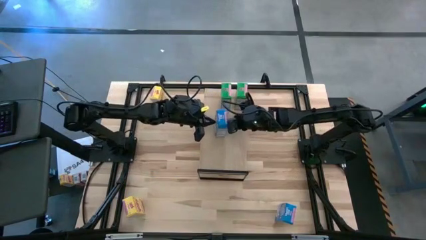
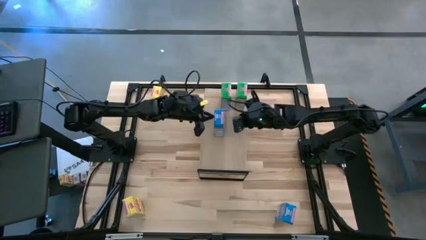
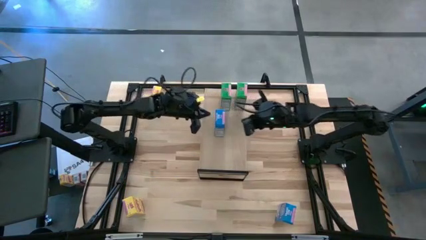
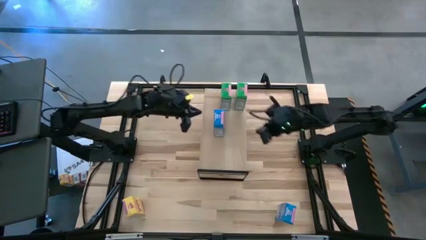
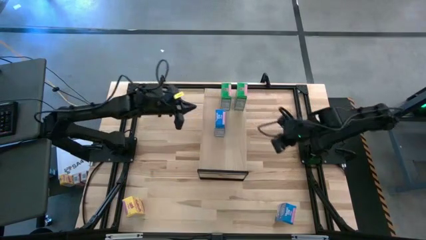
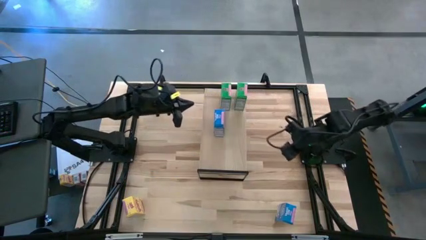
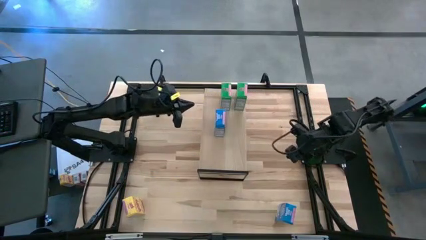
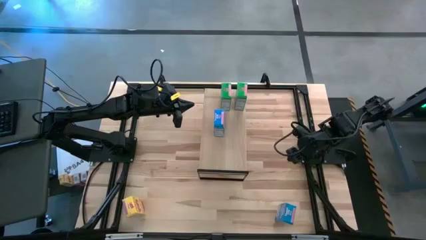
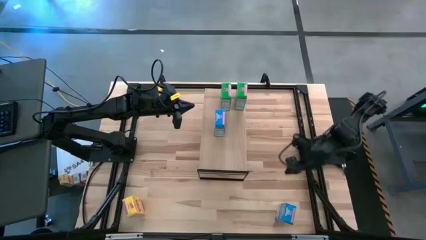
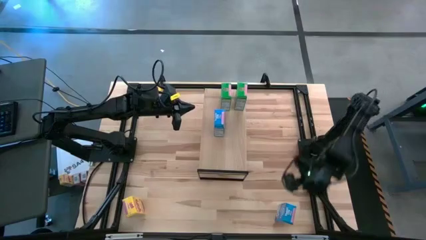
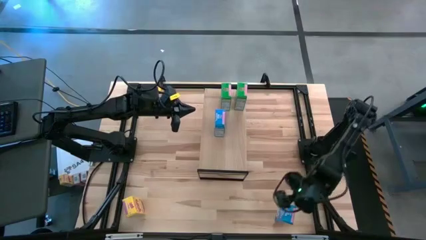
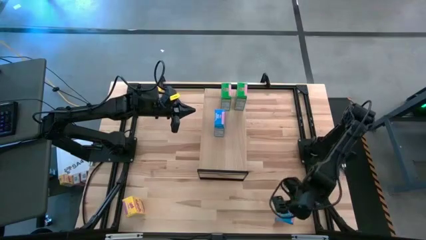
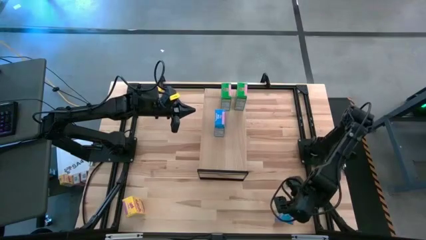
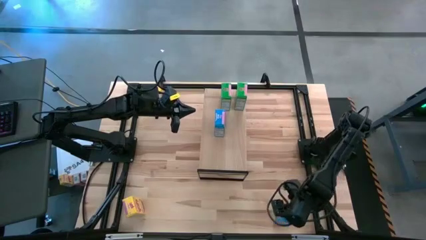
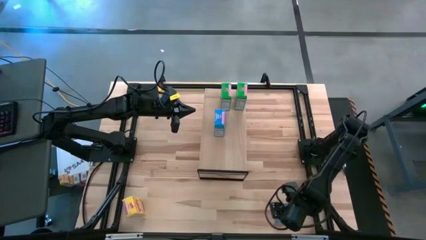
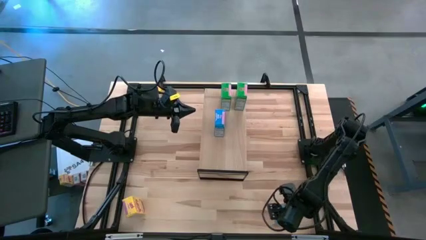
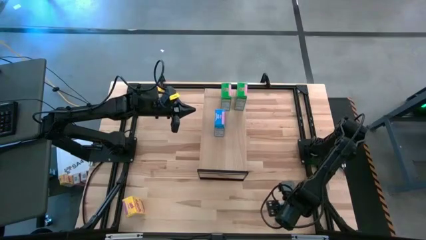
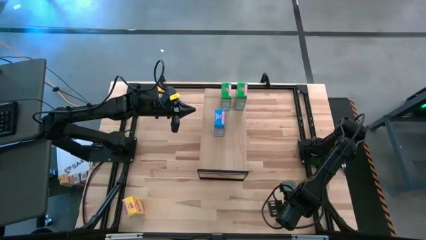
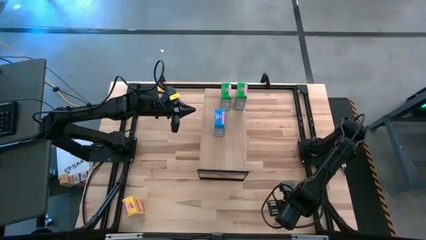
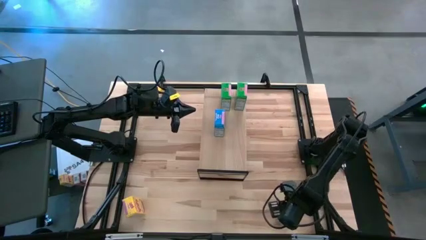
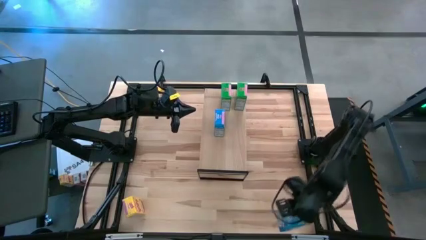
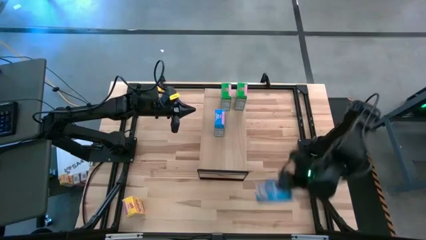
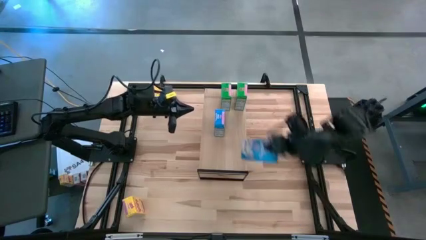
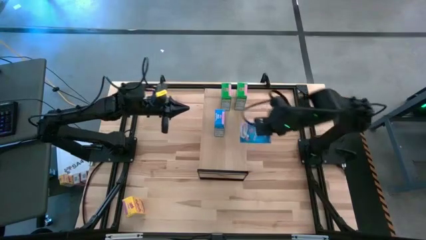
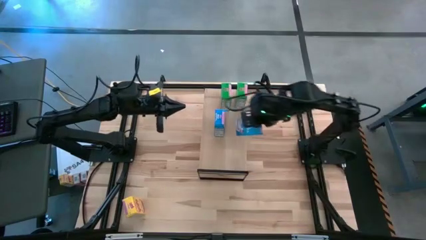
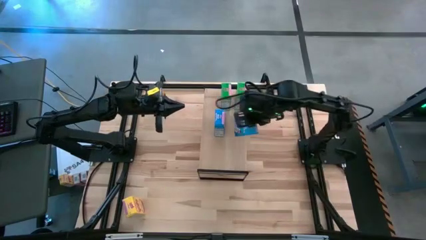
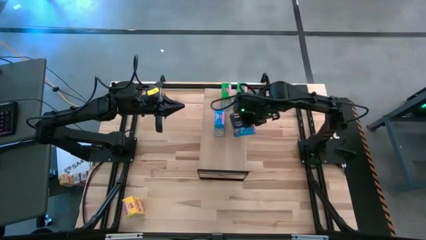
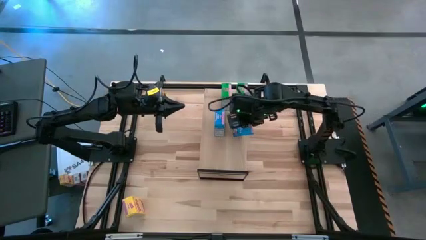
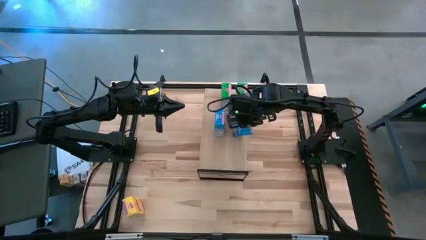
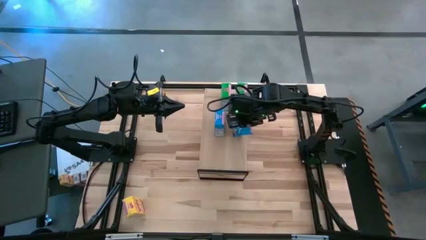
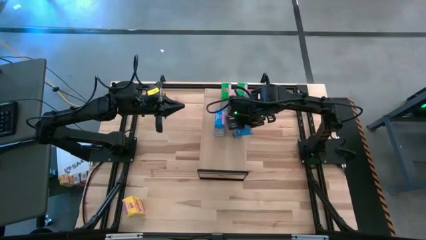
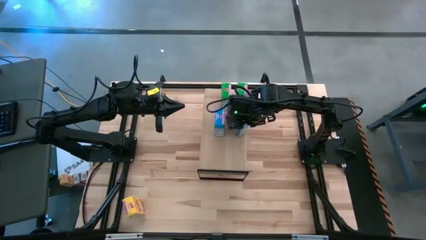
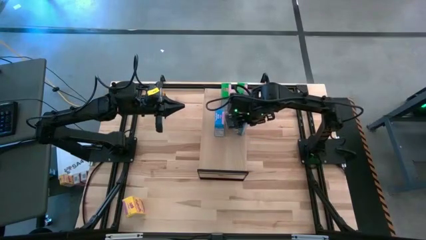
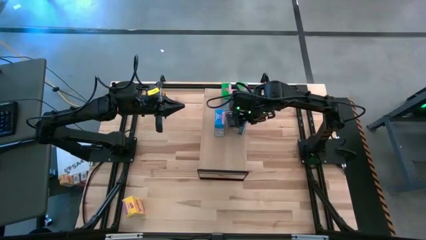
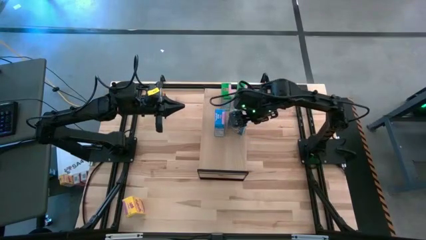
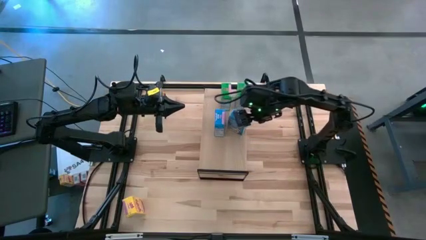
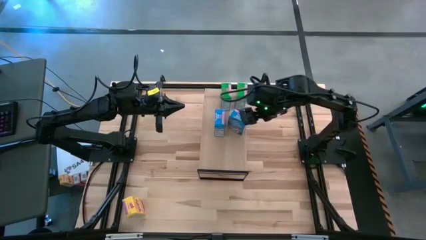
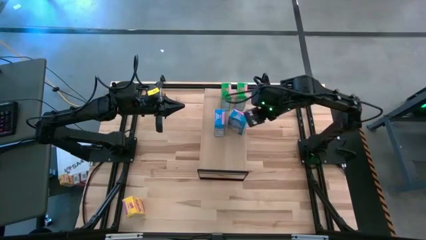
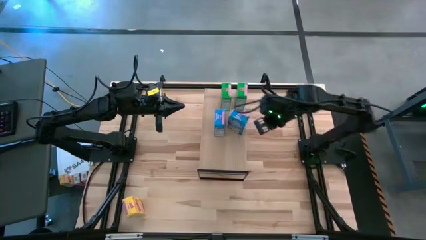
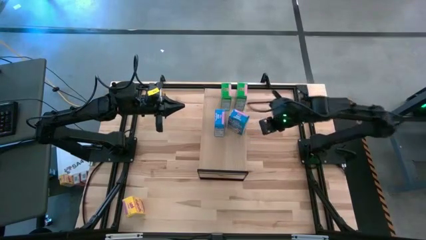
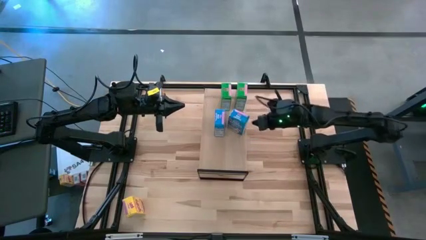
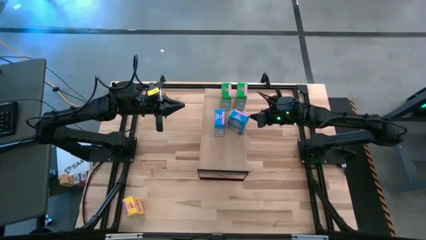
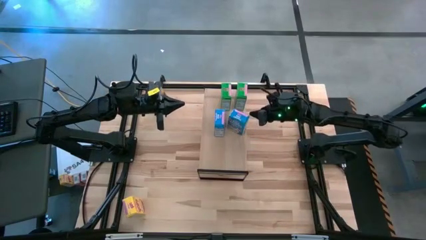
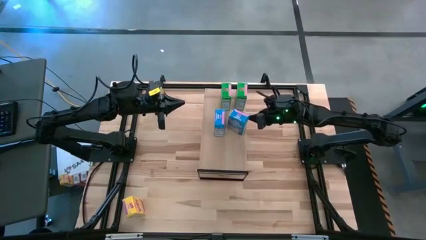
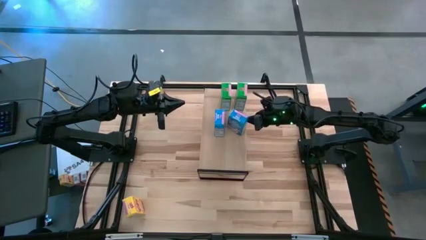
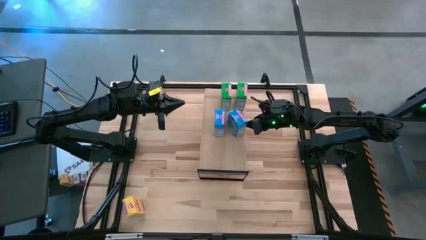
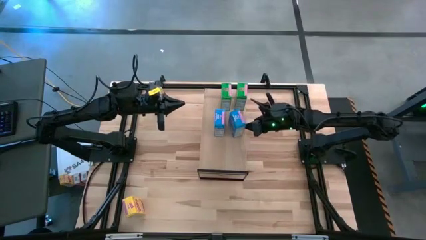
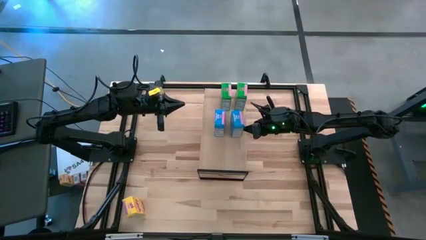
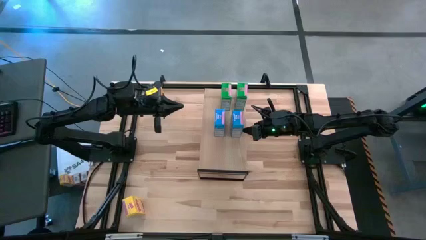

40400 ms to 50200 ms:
Task: Stack cereal on shelf
Put the blue cereal box on the shelf
